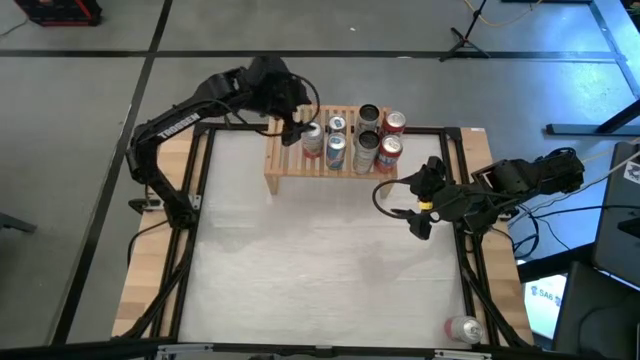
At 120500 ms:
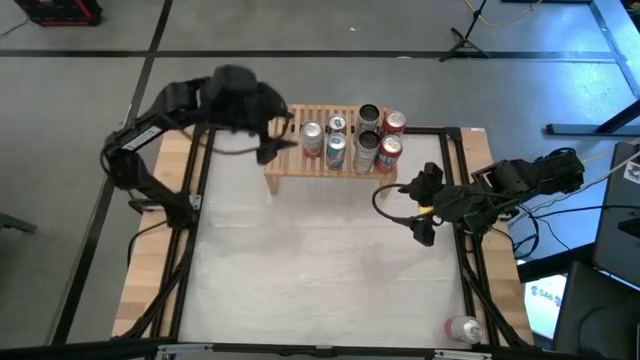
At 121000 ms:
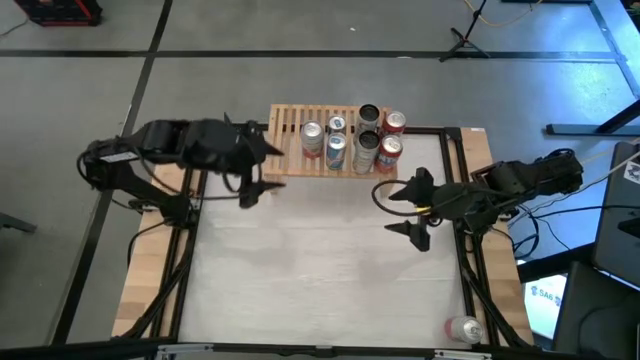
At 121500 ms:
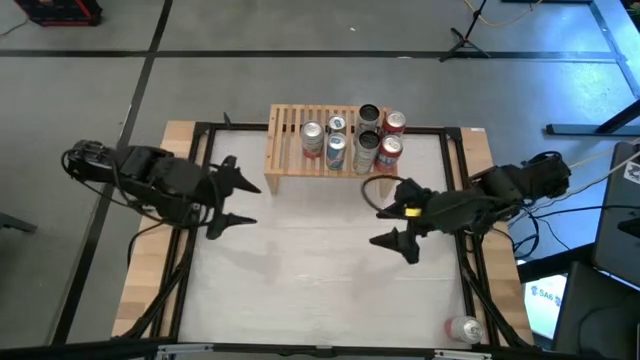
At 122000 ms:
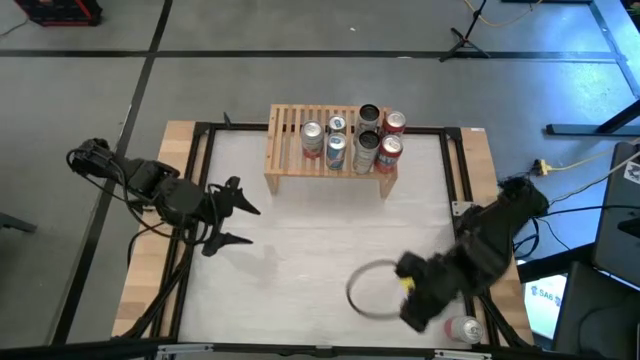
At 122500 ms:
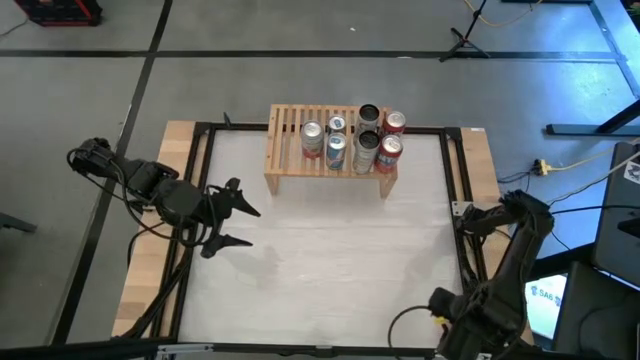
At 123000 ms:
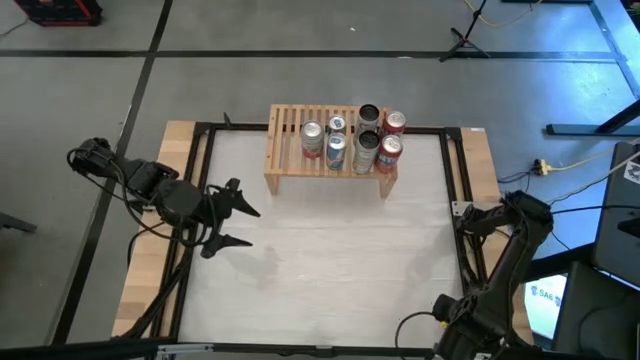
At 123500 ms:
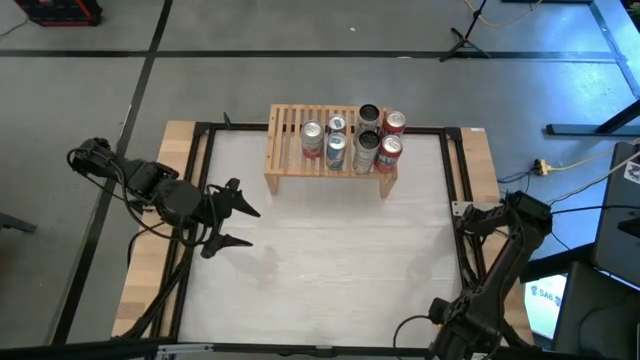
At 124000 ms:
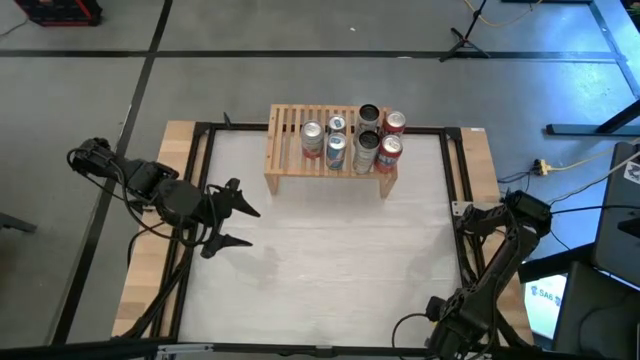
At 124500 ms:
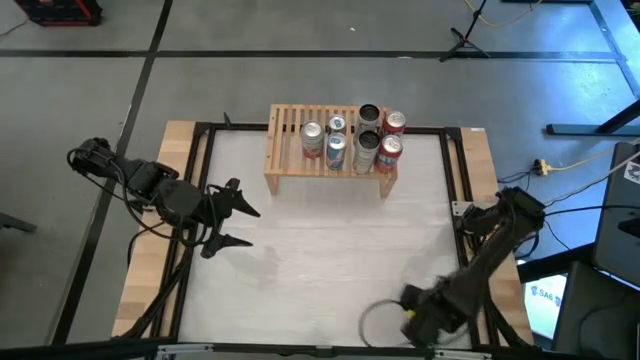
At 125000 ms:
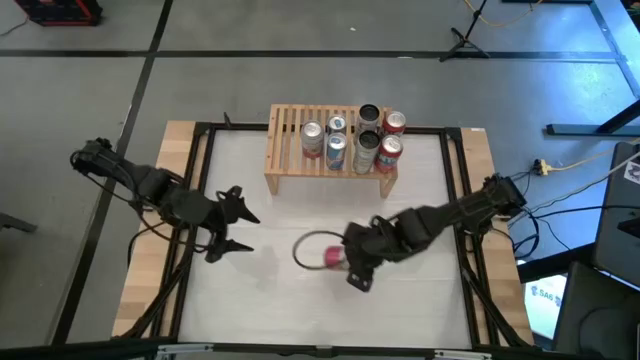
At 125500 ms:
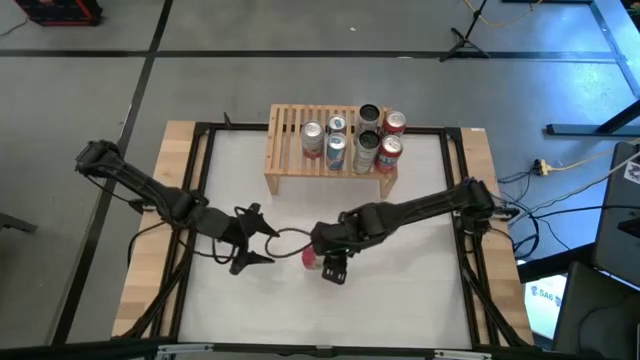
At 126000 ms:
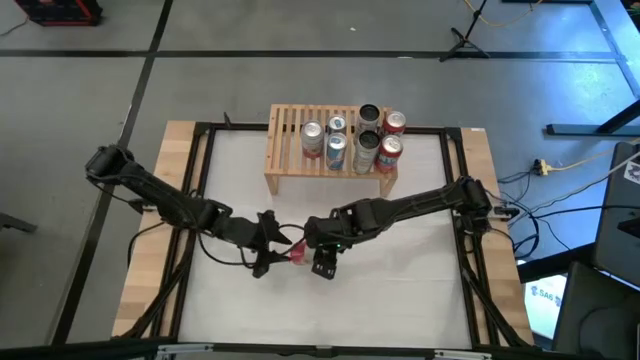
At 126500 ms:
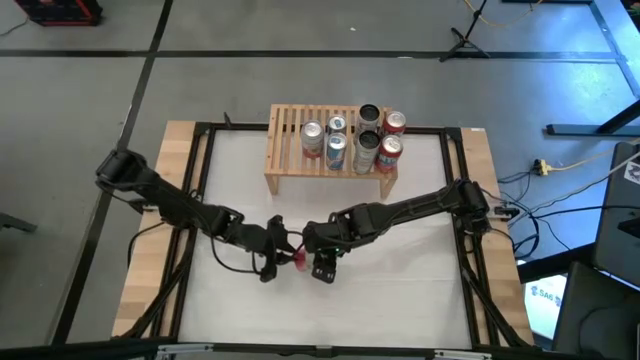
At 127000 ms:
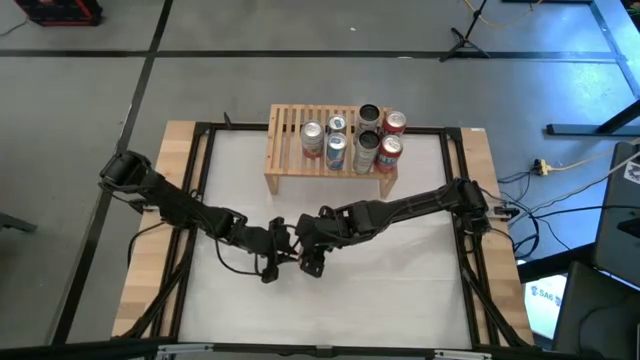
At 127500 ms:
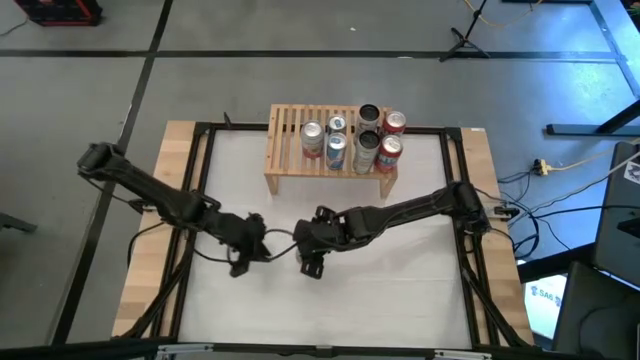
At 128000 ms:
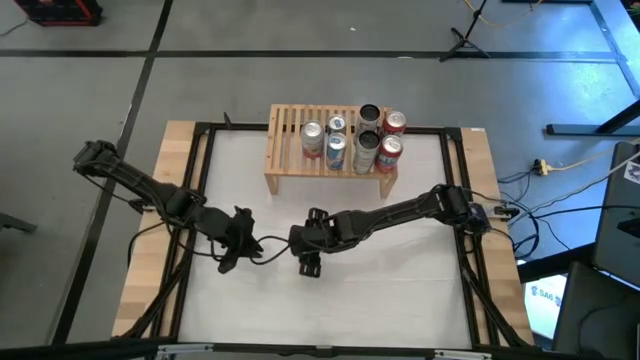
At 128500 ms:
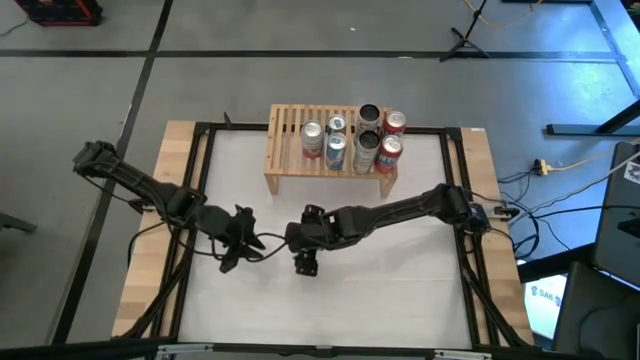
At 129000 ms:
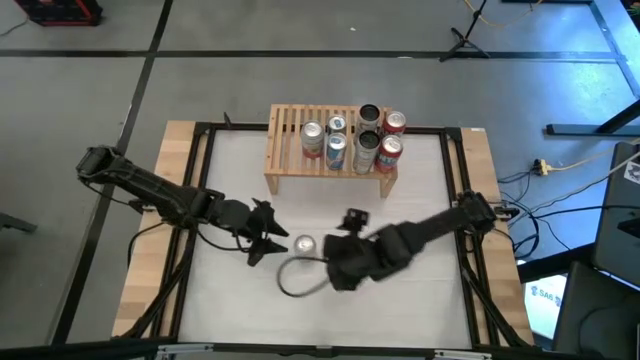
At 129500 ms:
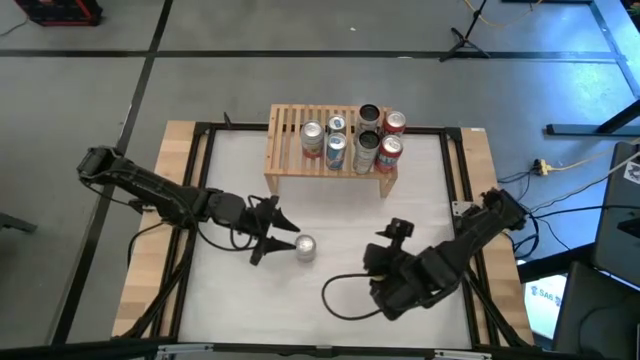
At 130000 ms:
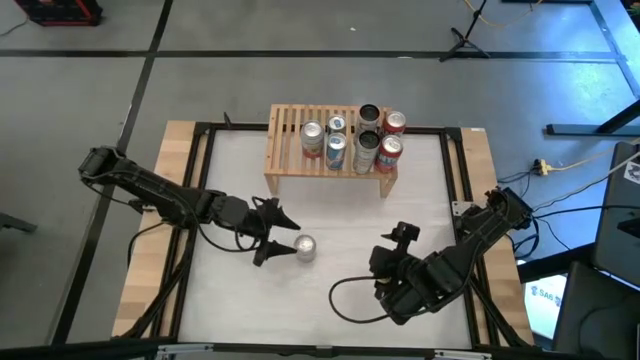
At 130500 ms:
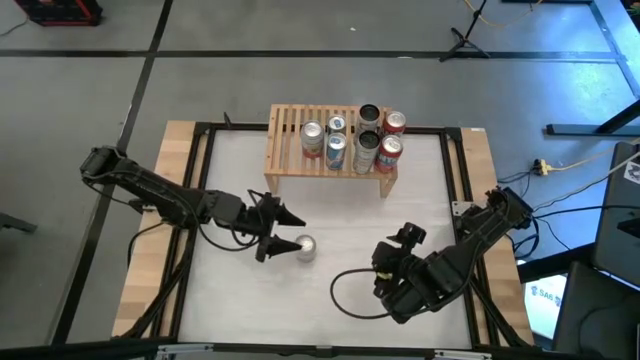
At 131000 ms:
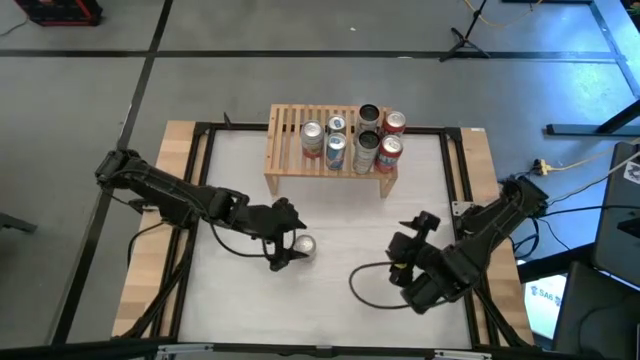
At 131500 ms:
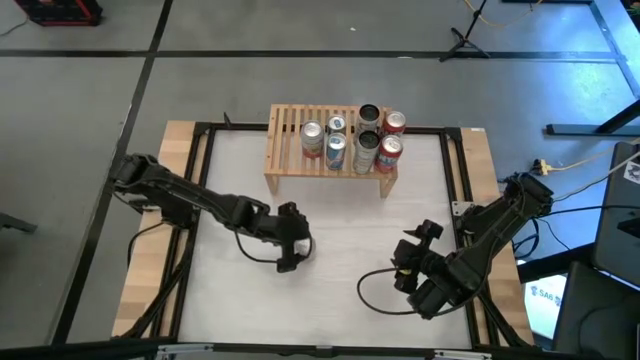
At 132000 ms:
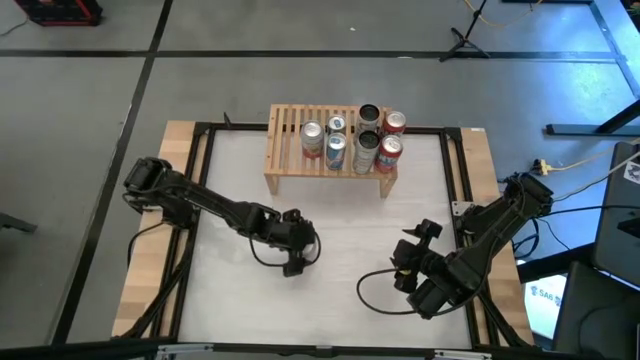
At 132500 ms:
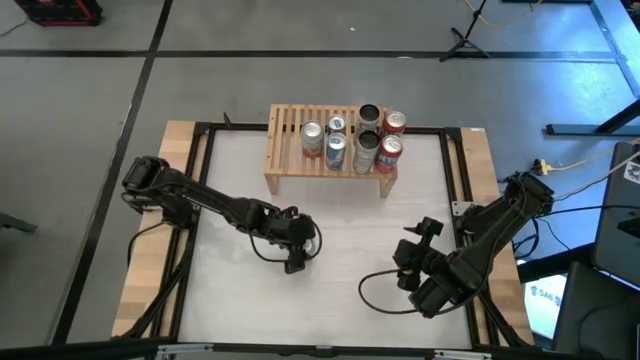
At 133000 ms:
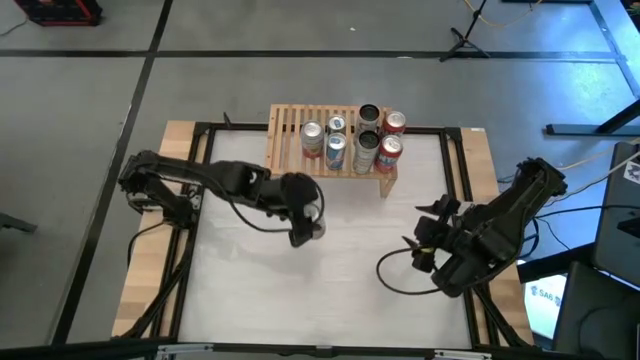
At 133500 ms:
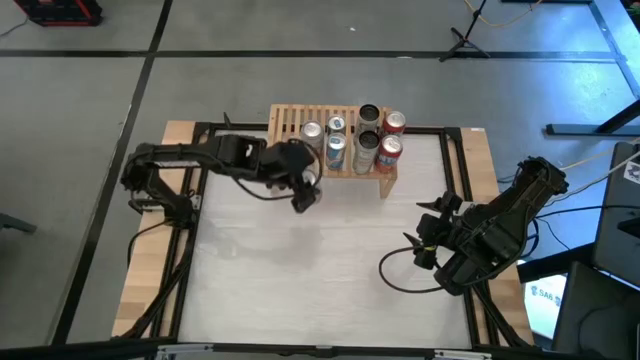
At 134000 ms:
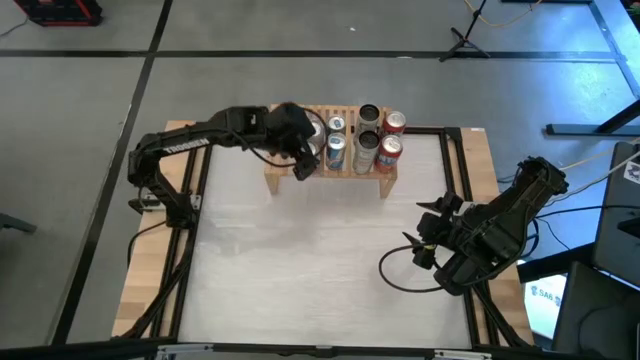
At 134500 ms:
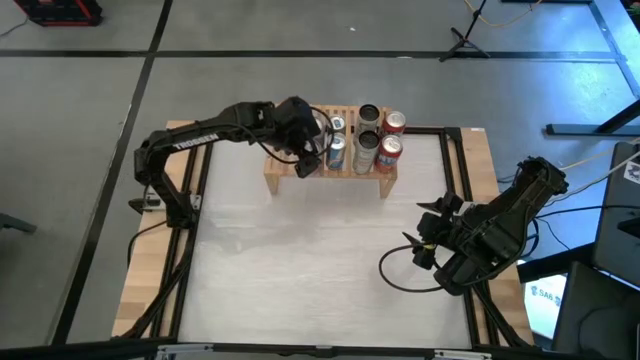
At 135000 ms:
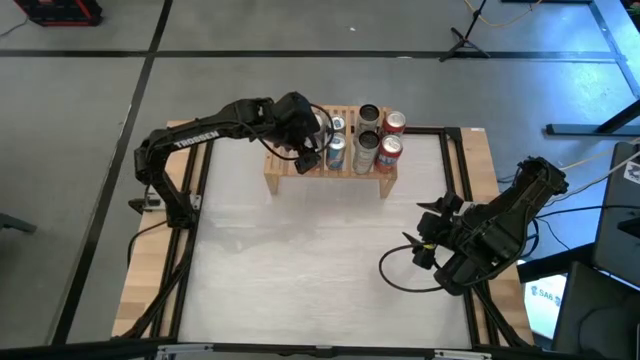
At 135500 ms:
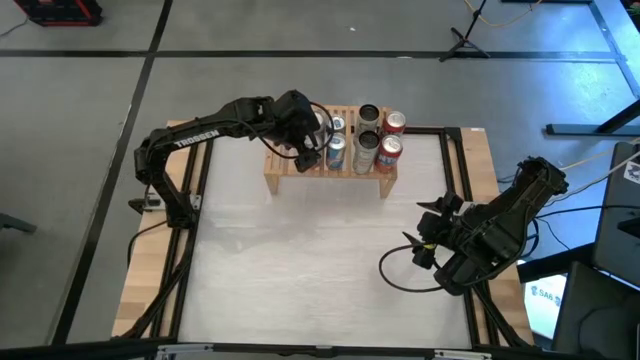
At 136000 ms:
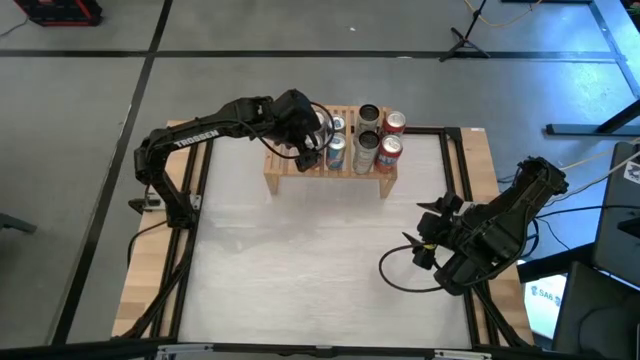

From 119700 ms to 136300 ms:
Task: Place canned beverage on shelf
Put the pink soda can aligned with the other pink soda can on the shelf

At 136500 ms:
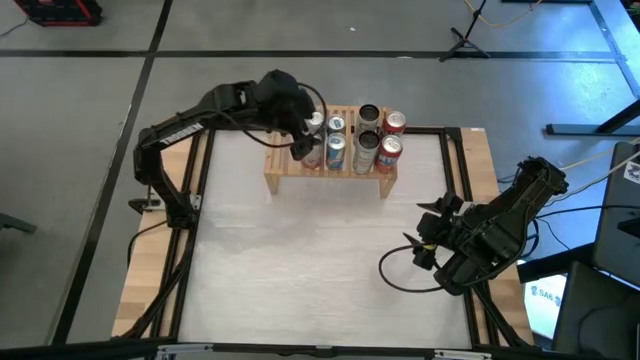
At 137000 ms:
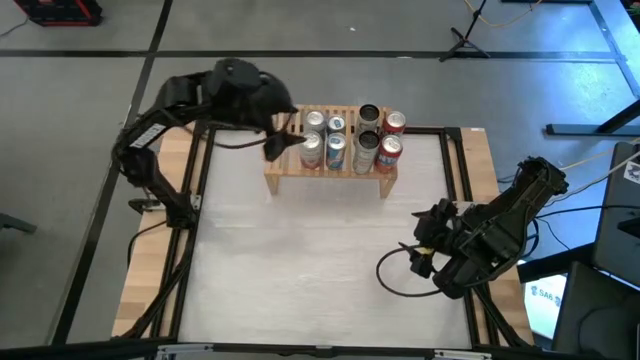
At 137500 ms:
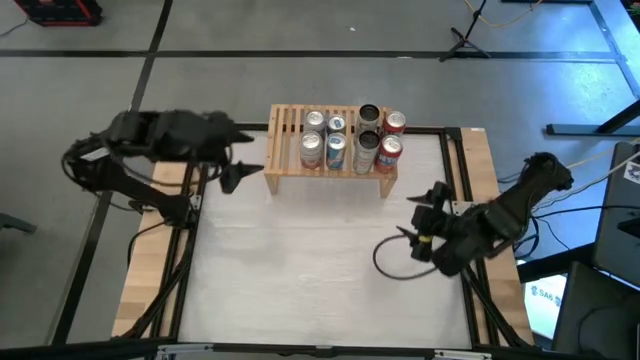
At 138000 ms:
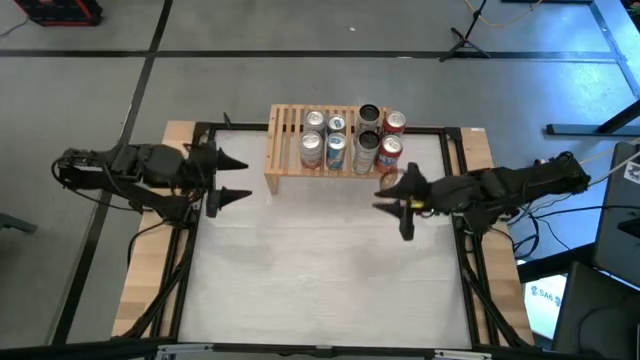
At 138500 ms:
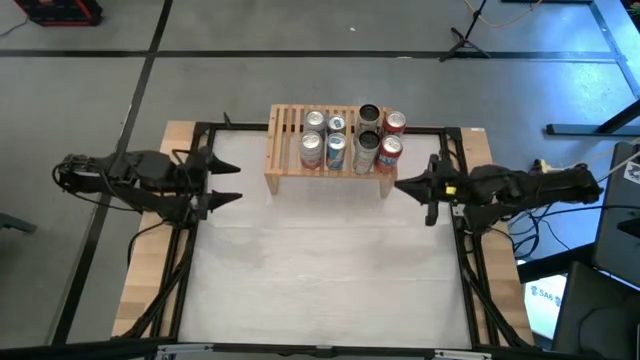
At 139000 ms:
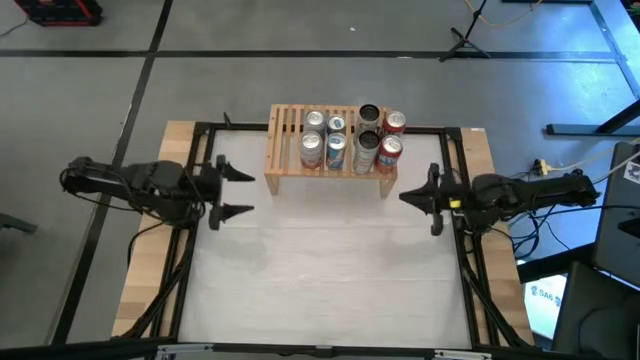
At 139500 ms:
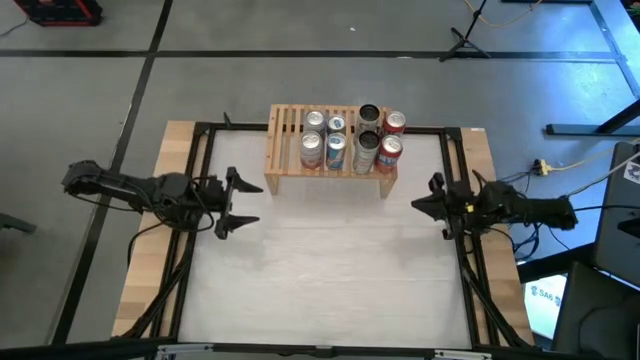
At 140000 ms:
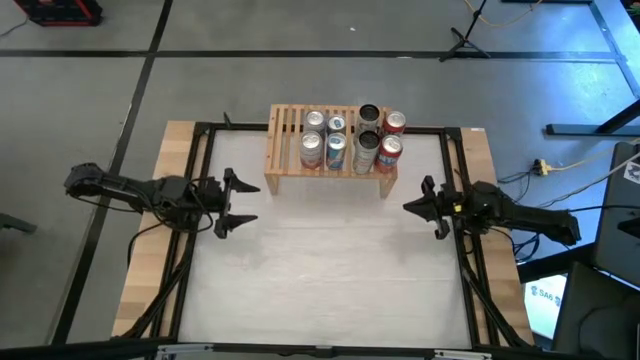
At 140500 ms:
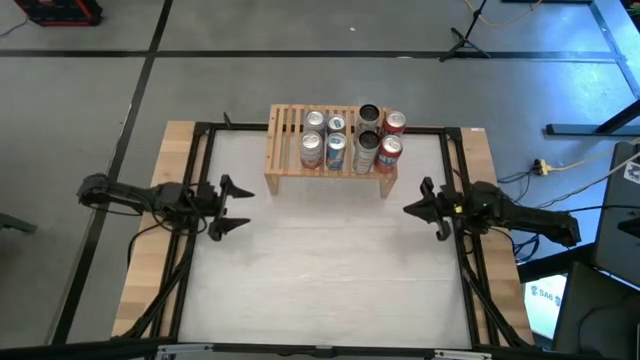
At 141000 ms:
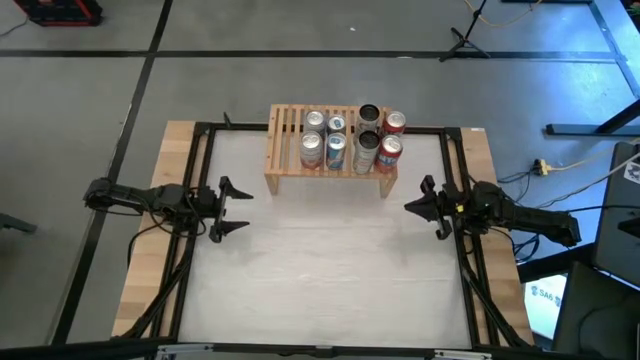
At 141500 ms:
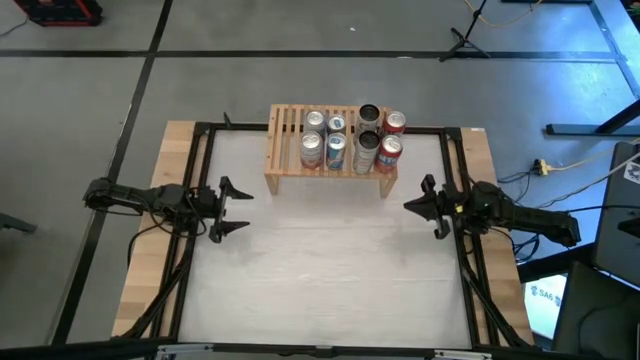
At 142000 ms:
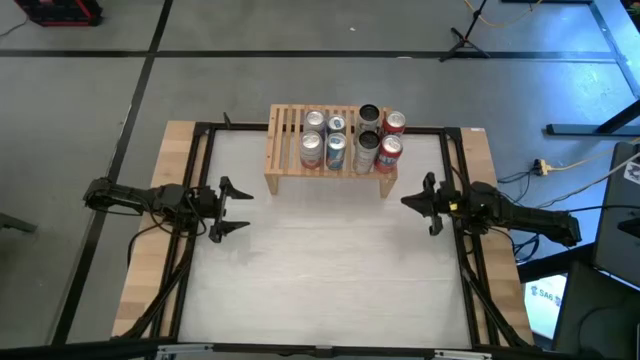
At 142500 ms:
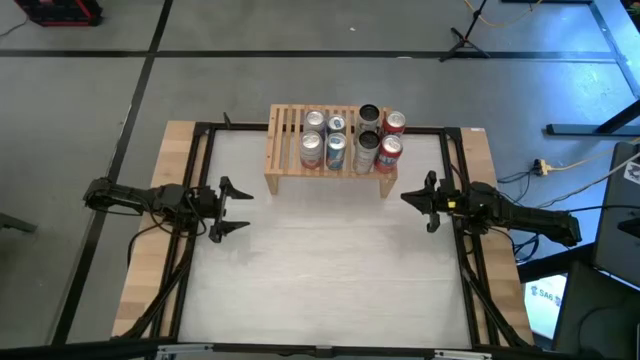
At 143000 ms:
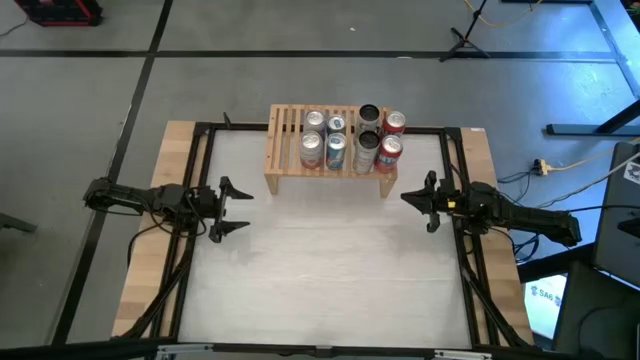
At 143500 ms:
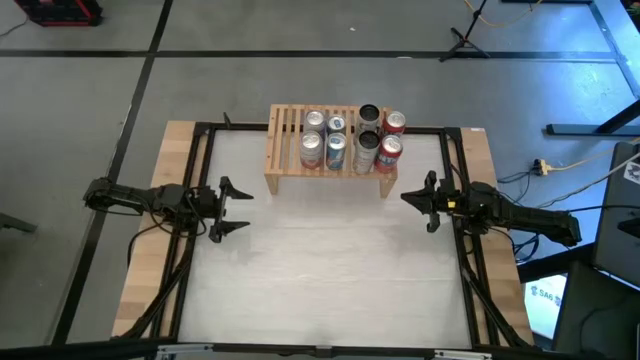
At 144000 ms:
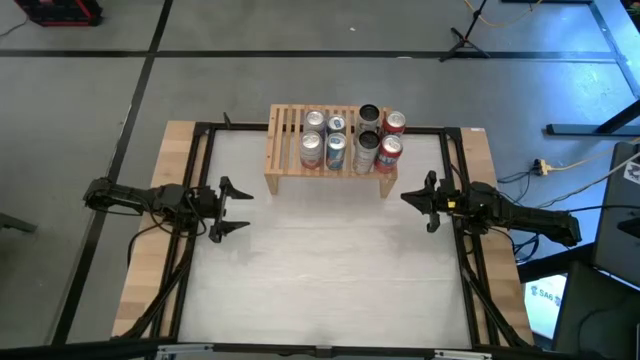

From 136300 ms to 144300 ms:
Return to Home Position
